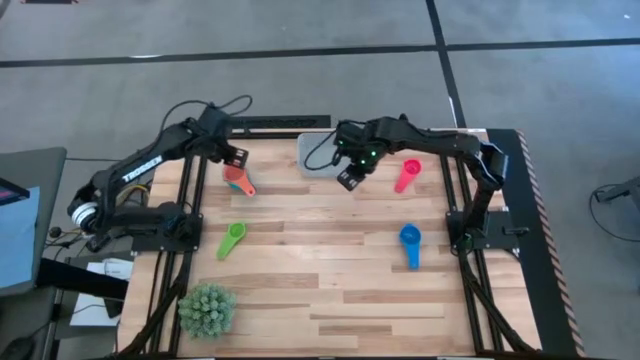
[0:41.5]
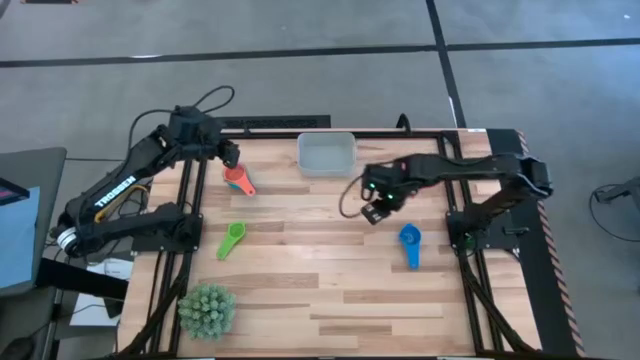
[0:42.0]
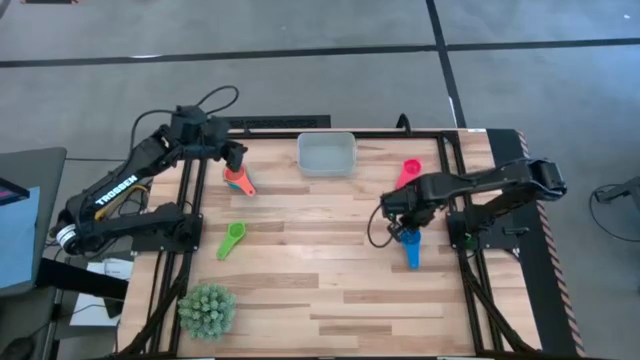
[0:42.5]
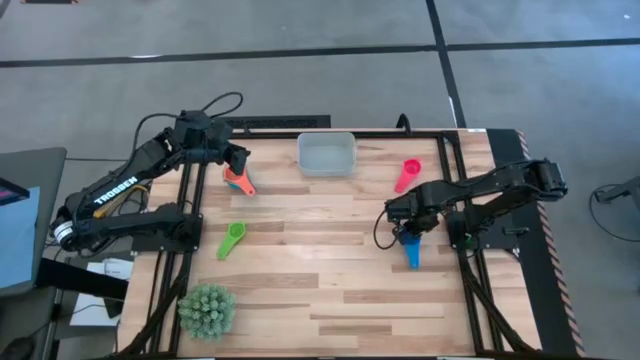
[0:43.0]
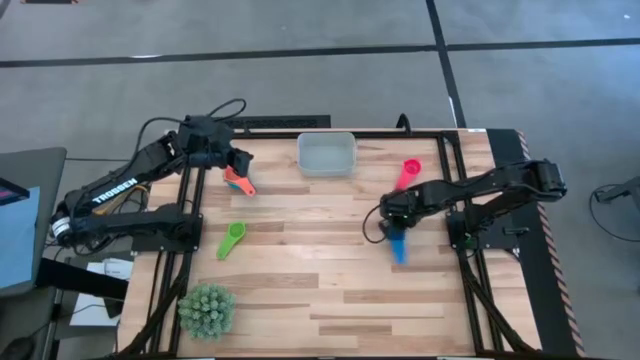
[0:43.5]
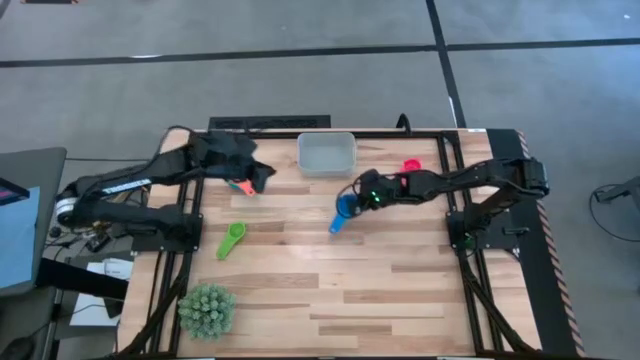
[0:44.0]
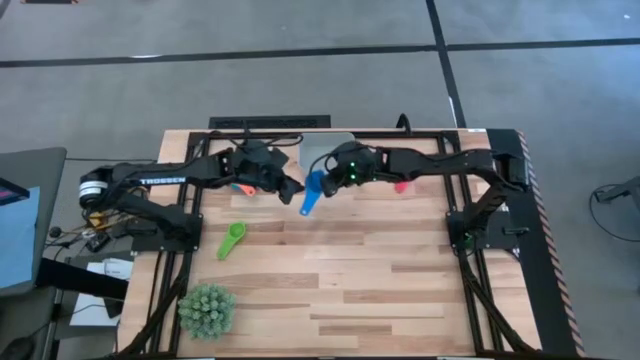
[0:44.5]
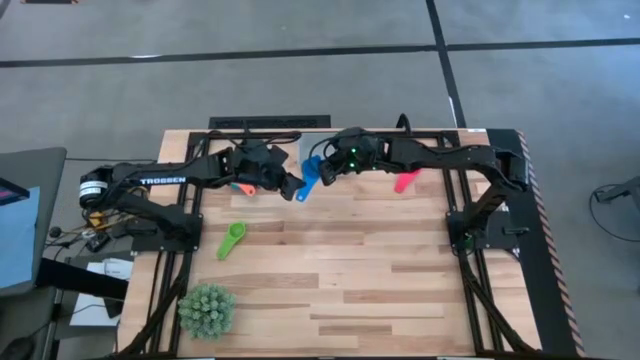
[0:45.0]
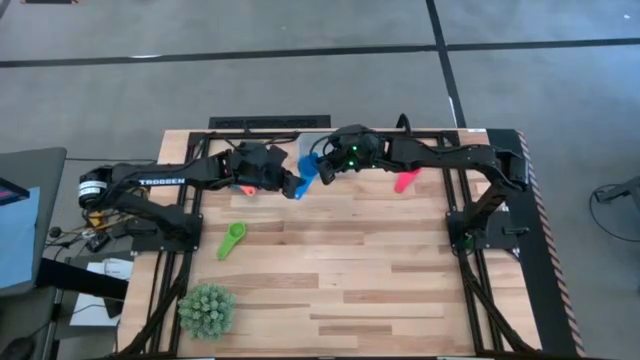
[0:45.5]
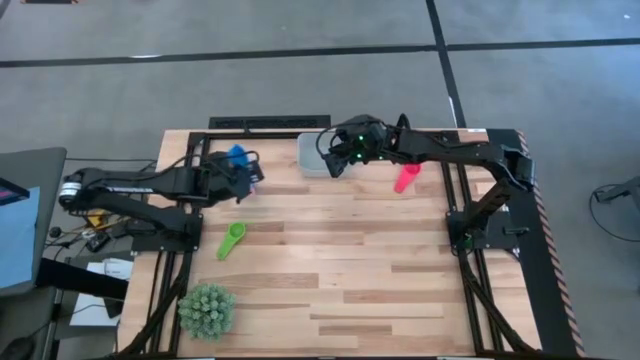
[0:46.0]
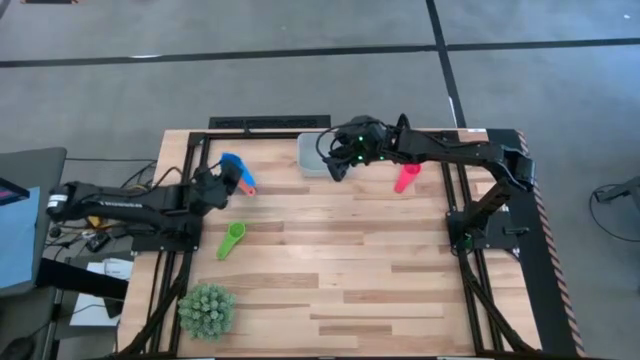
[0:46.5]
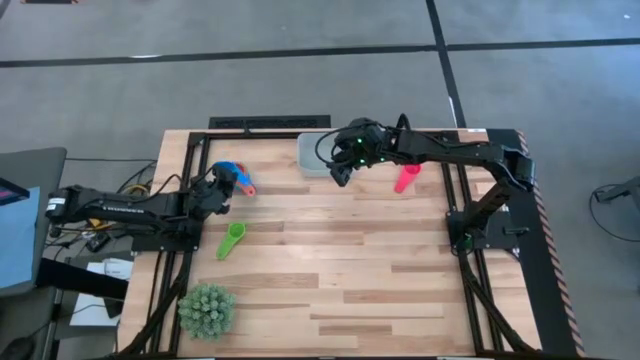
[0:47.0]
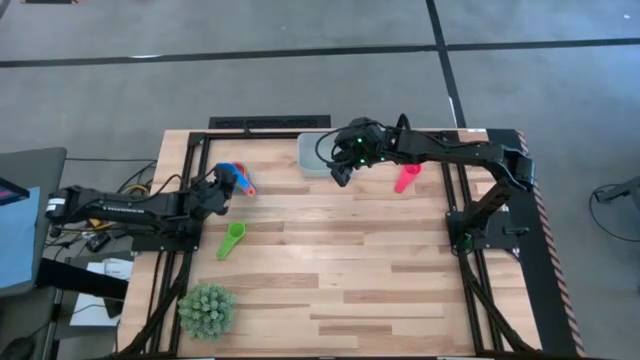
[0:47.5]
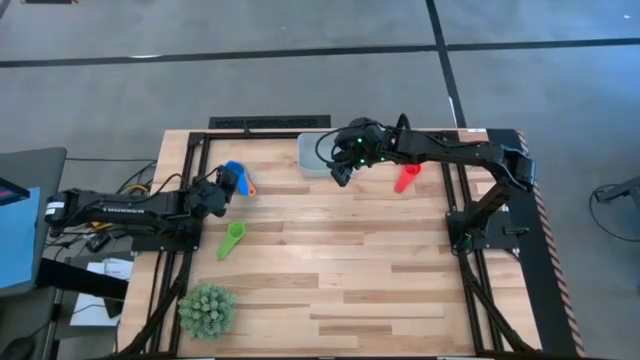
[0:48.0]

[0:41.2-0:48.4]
Task: Nest measuring cups in basket
Stack the blue measuring cup on the orange measuring cup

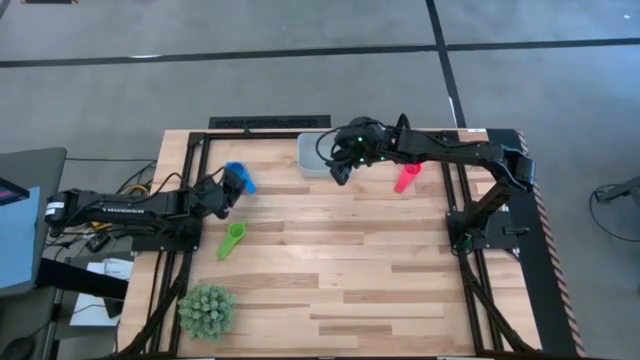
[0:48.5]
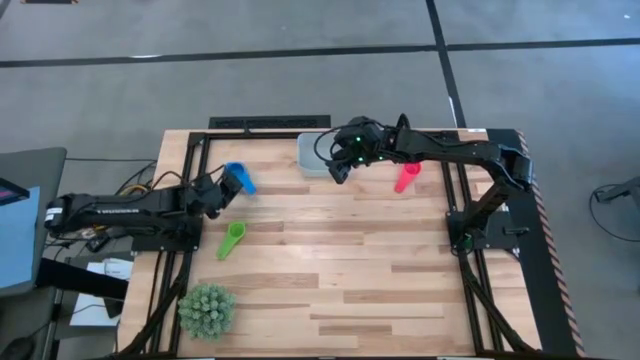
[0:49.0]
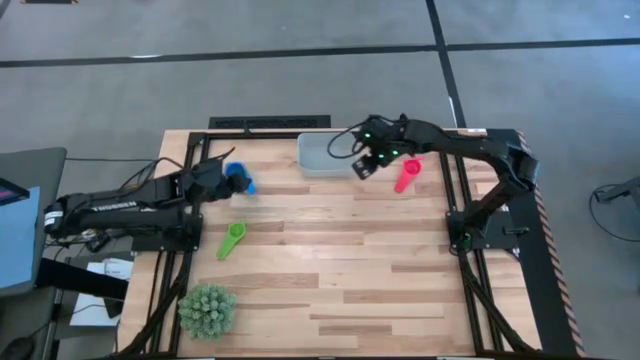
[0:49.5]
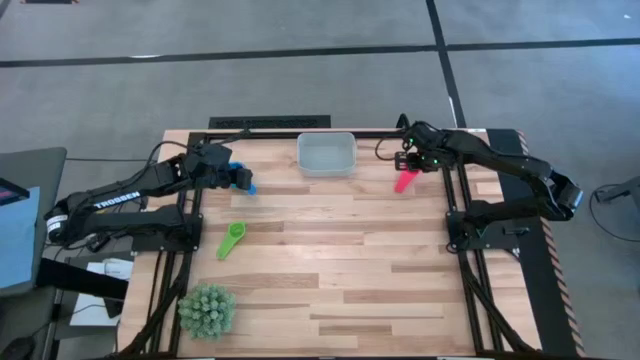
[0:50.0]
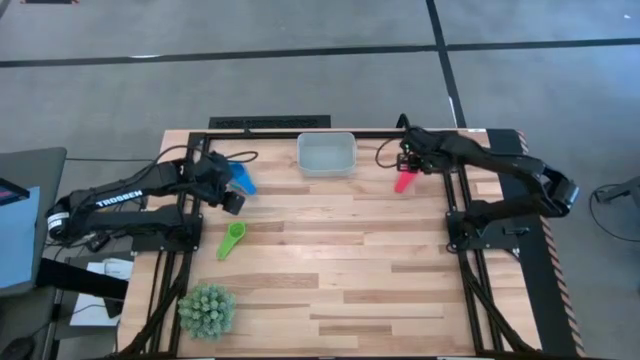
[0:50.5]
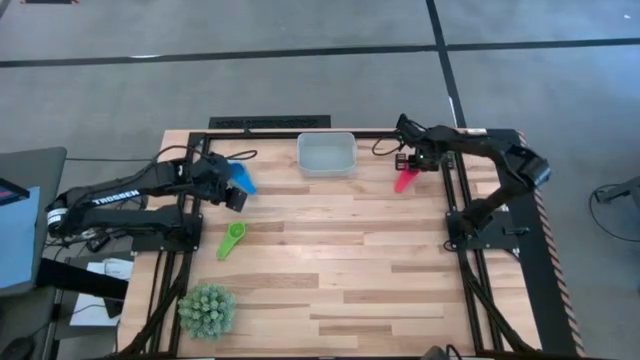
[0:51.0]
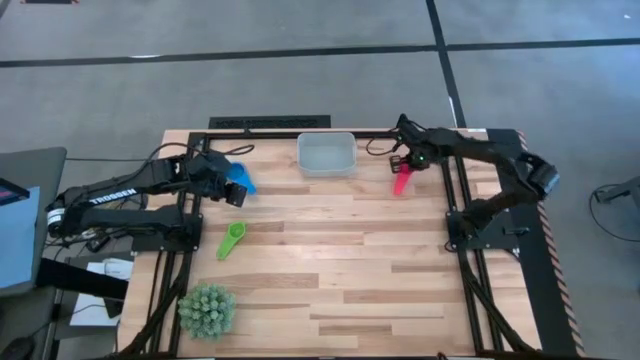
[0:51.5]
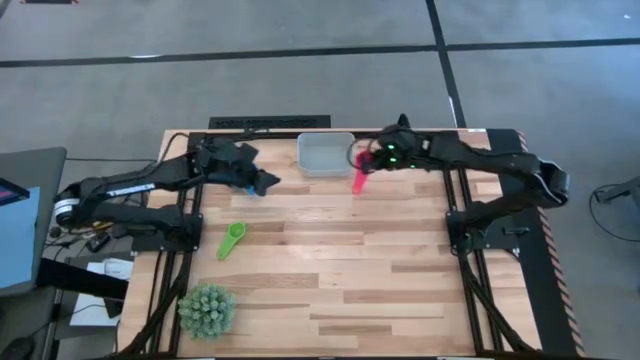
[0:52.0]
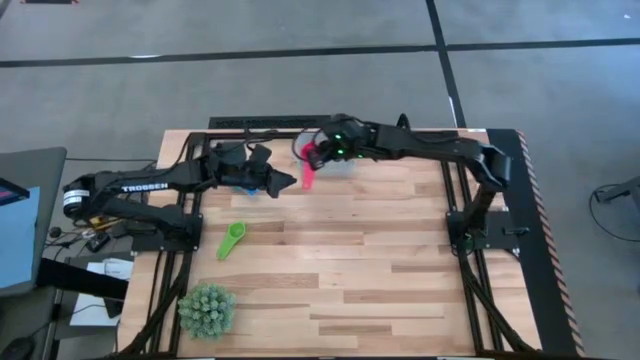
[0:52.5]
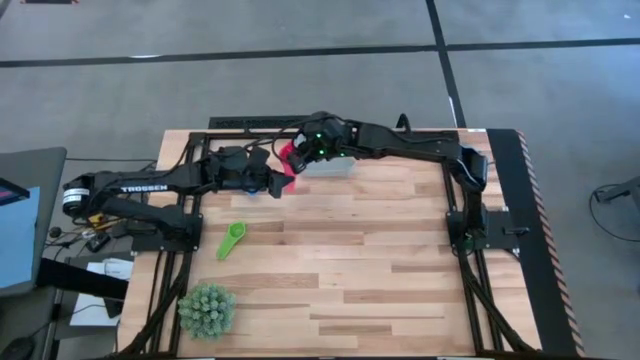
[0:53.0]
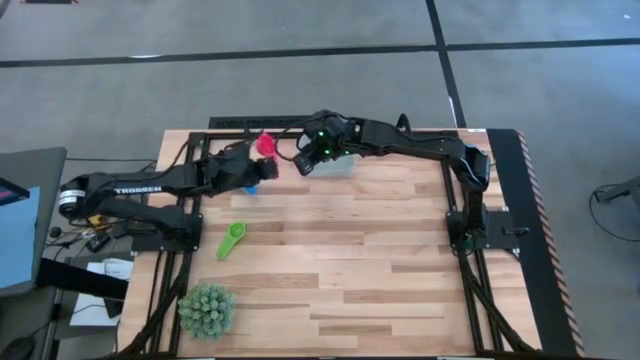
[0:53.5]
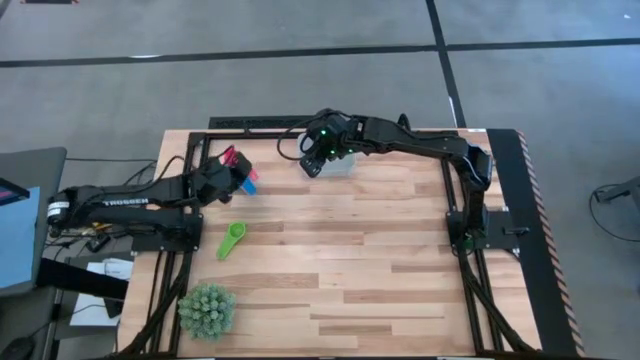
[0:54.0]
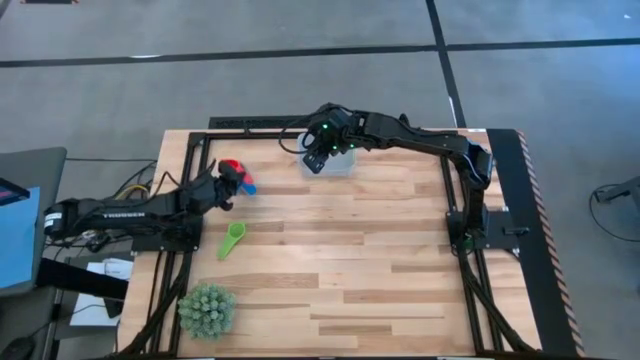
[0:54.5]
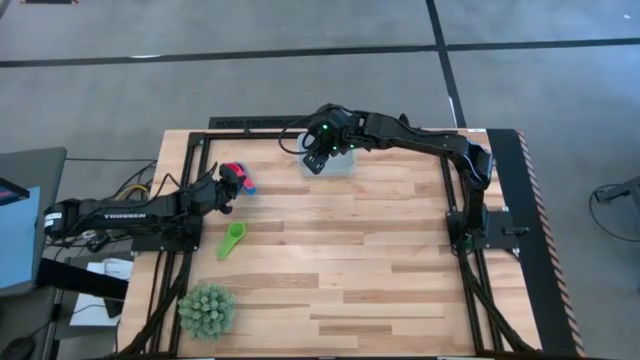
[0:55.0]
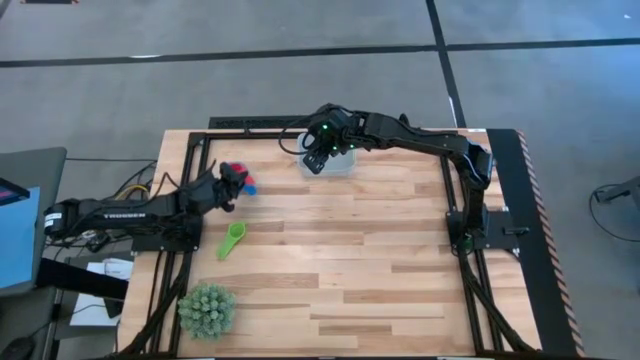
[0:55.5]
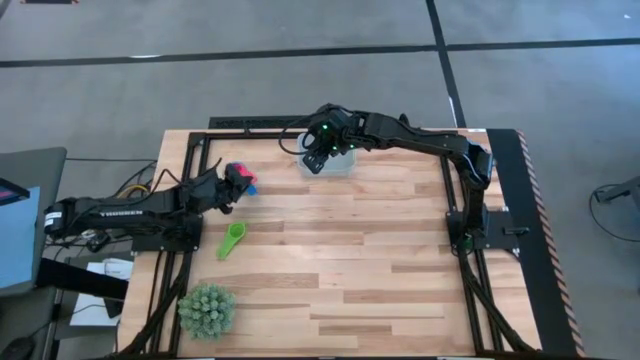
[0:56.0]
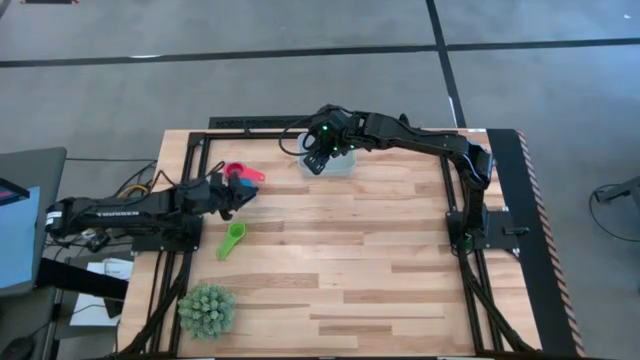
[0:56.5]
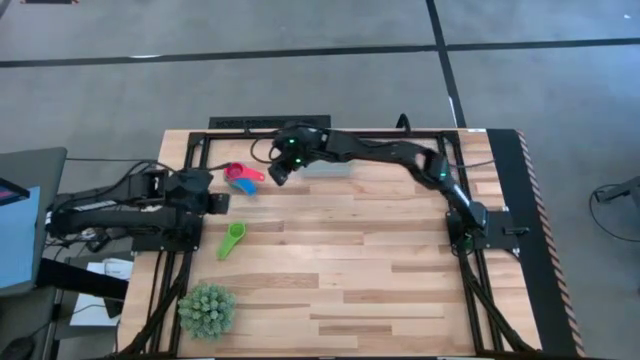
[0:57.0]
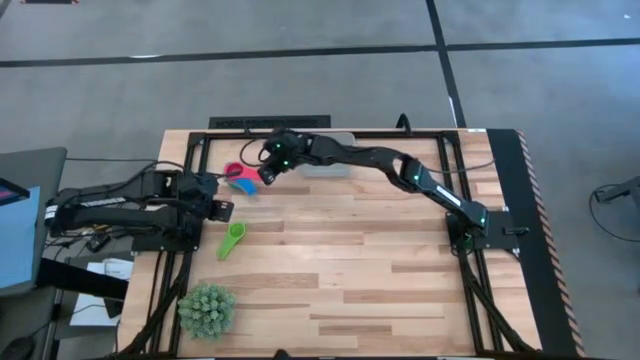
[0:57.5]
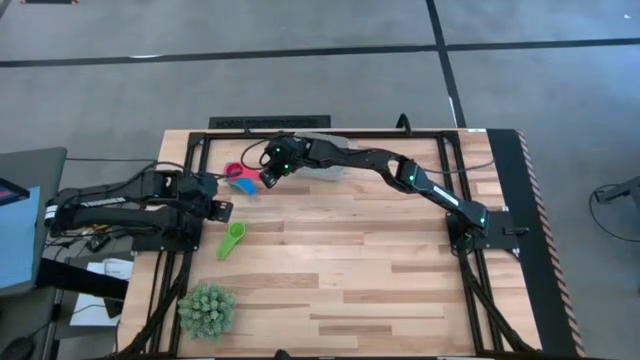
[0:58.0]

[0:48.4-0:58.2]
Stack the red measuring cup on the blue measuring cup

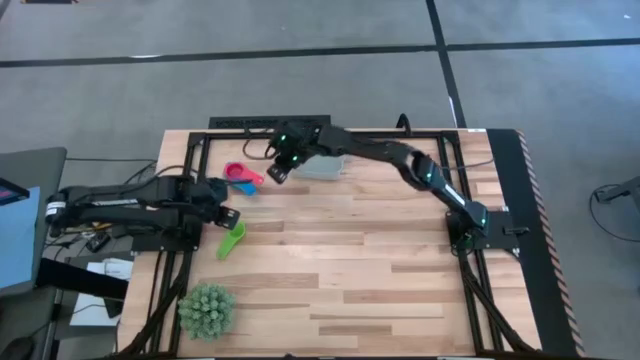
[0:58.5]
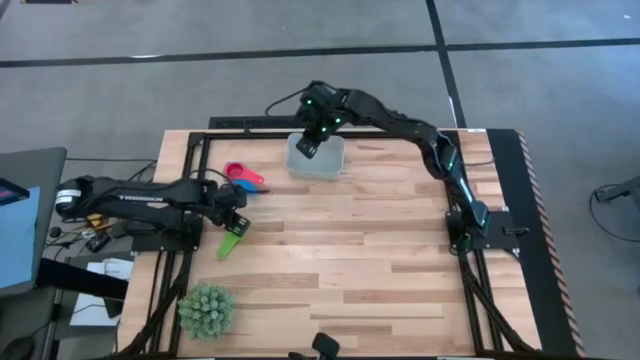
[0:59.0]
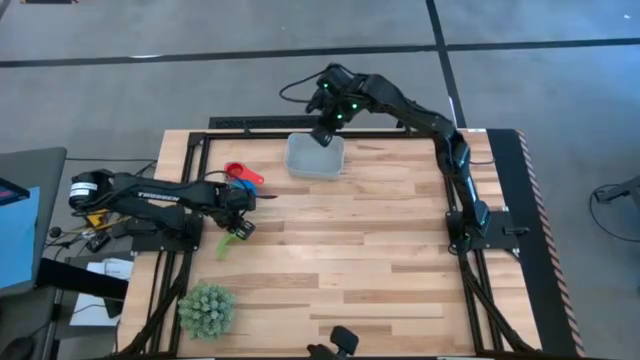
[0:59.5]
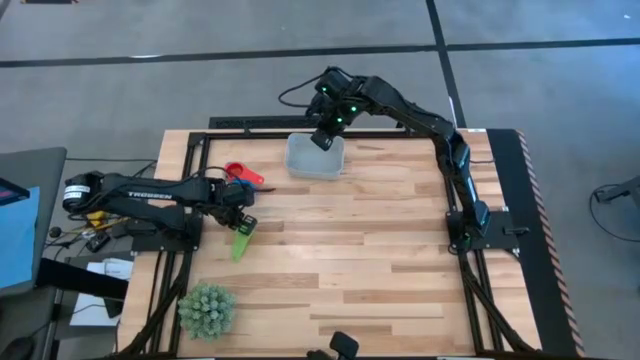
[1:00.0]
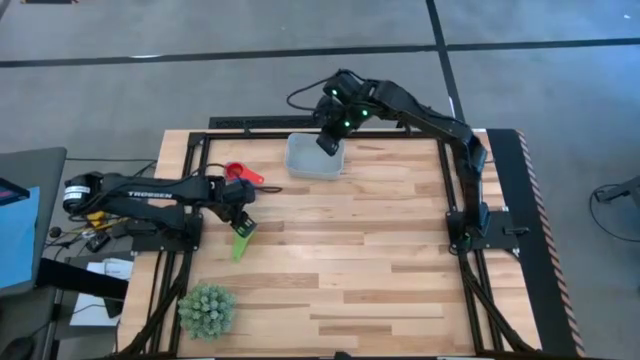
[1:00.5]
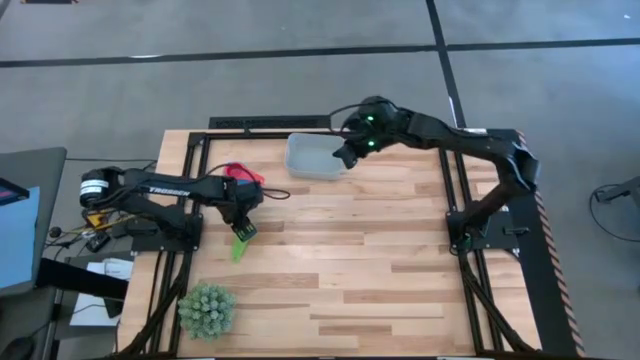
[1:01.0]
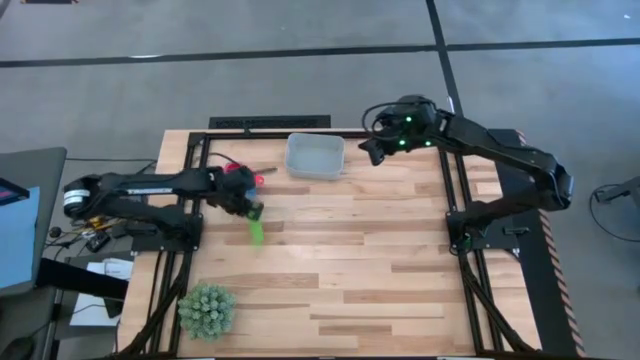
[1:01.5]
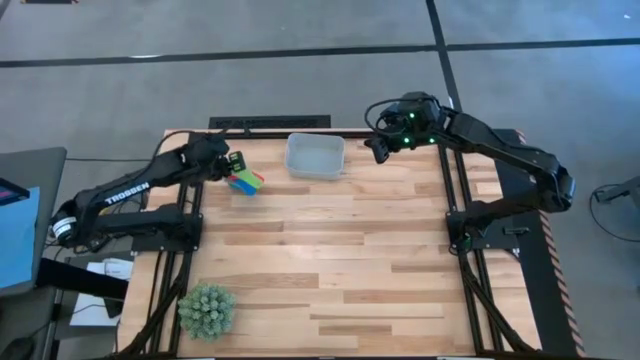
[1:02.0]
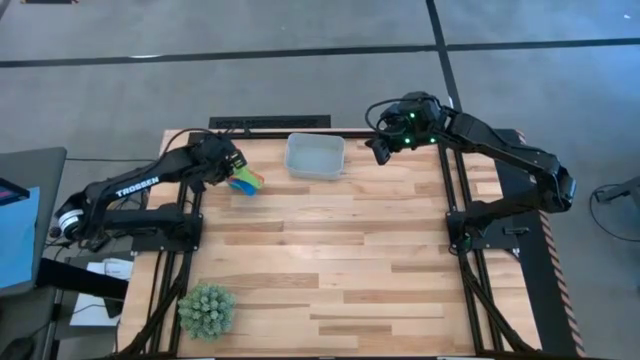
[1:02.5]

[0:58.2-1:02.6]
Stack the green measuring cup on the red measuring cup
